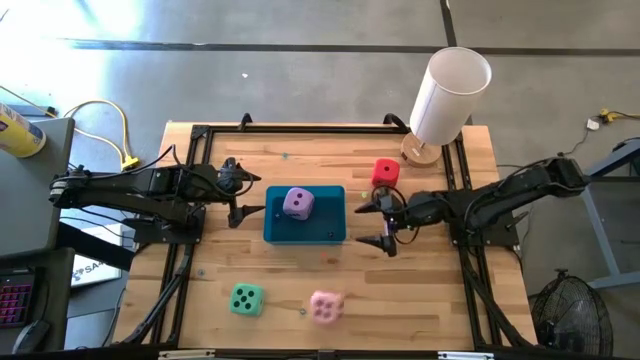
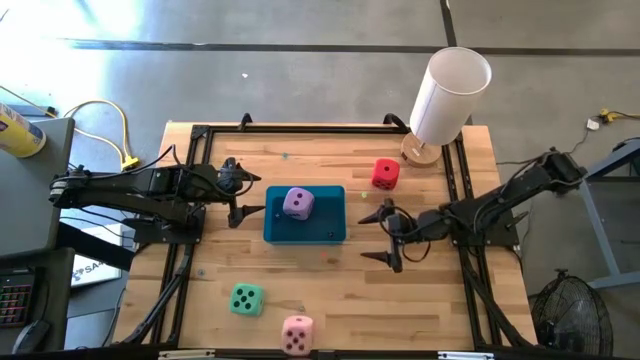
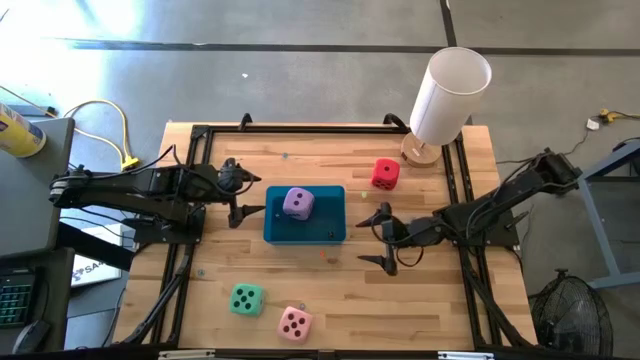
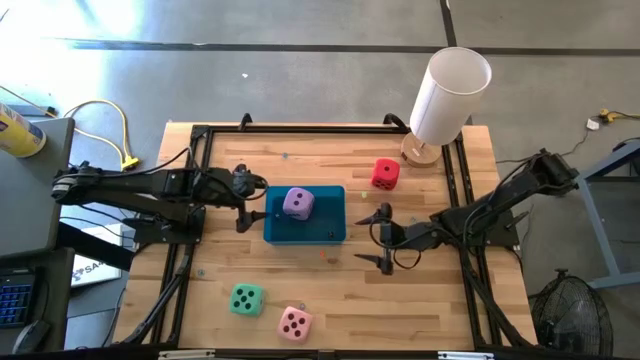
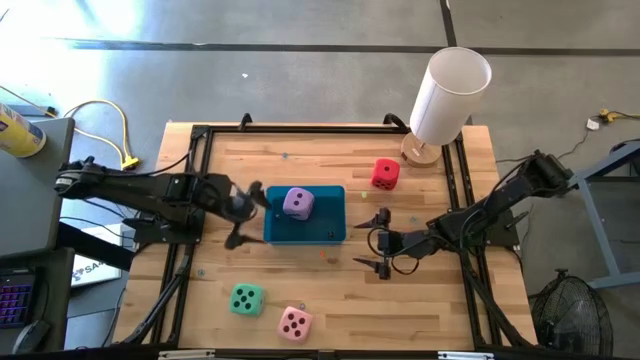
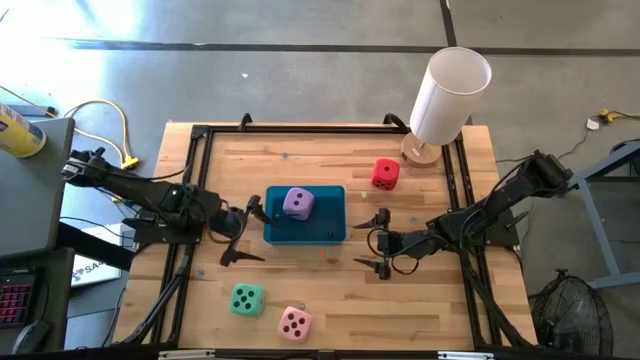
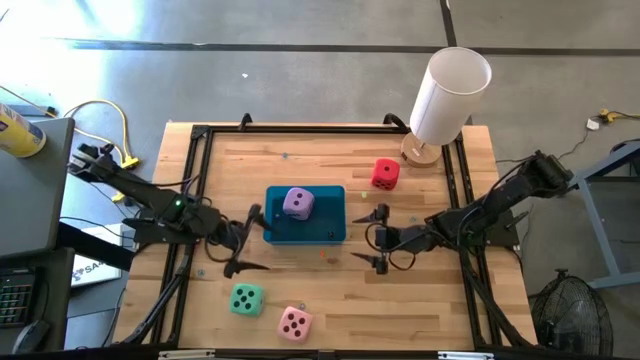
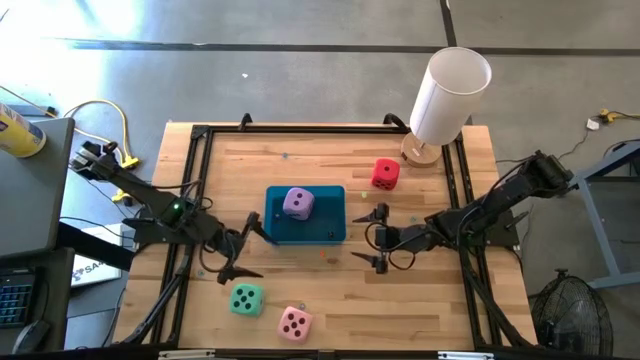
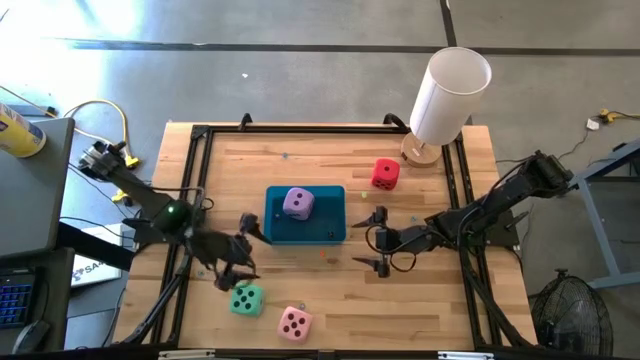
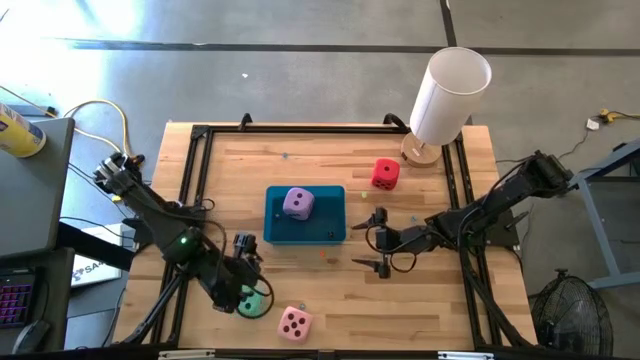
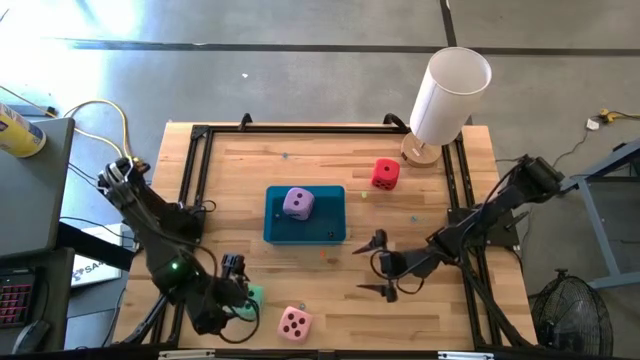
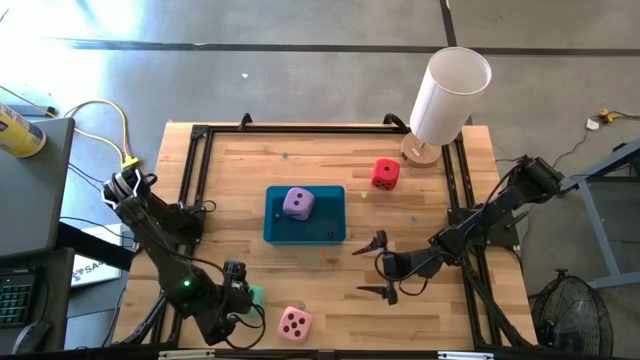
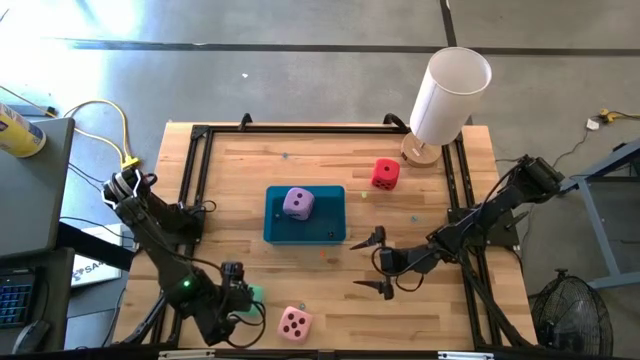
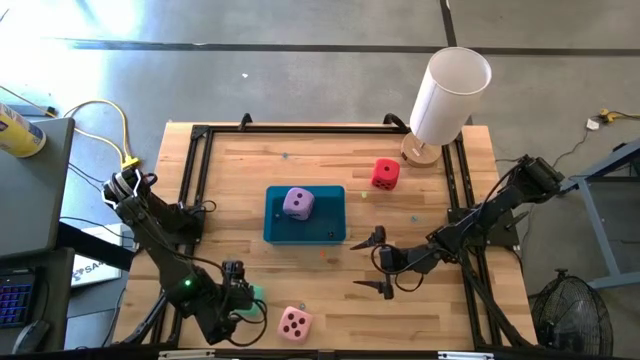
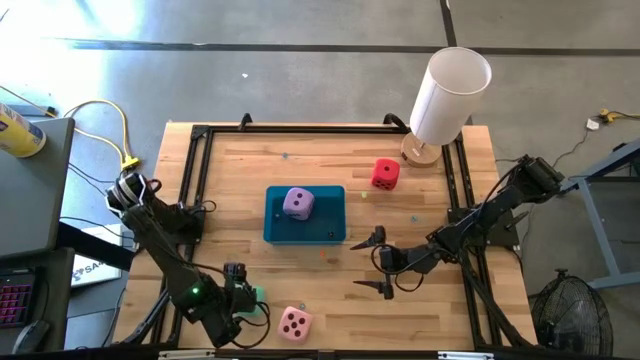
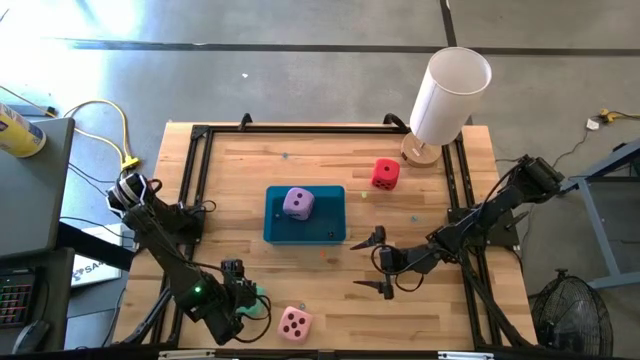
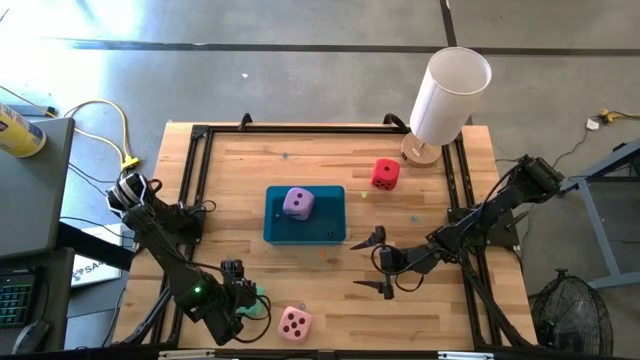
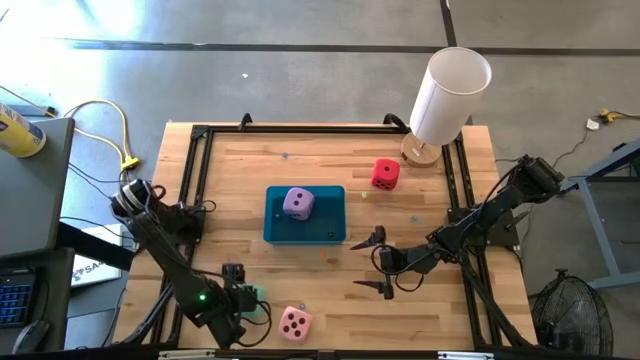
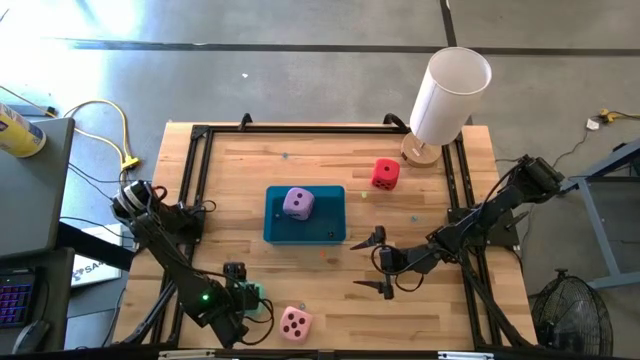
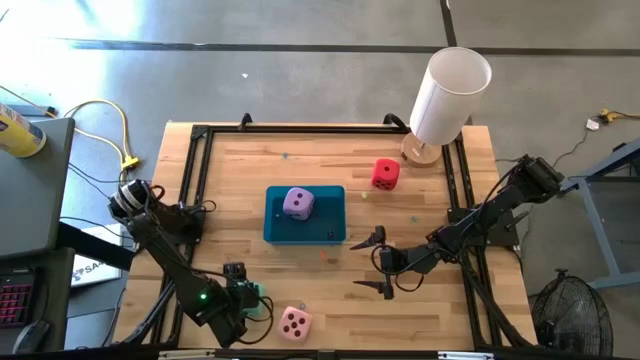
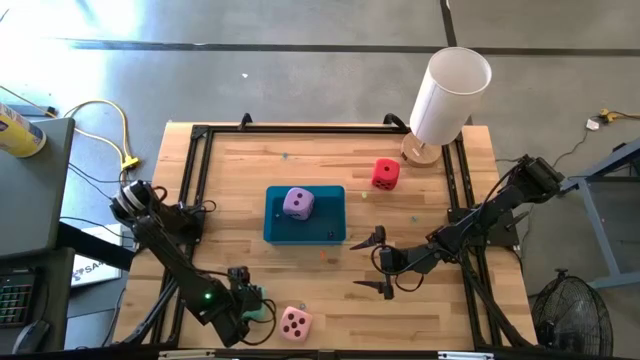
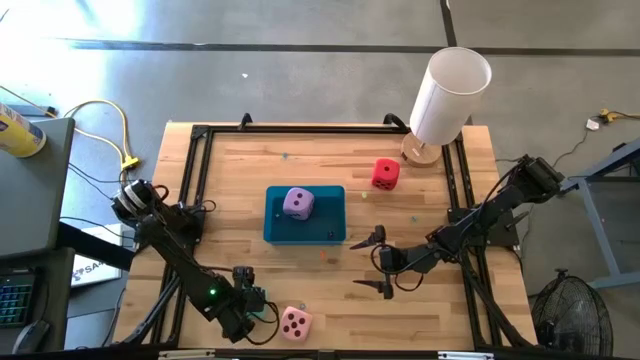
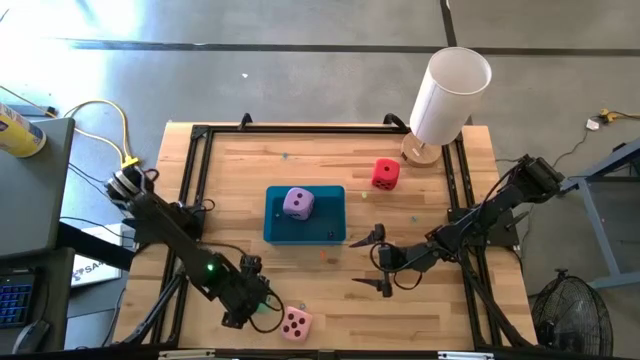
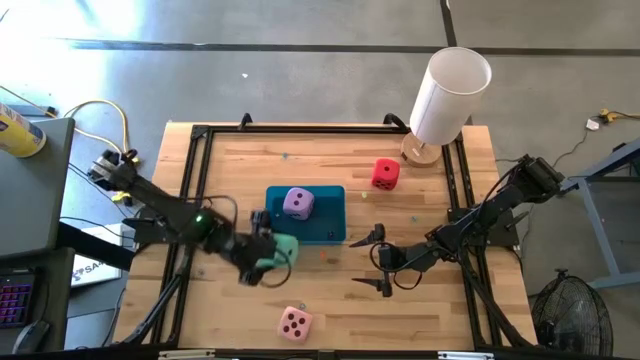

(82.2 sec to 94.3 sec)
Task: Pick & Place Dice
Put the large light green dice into the blue bin

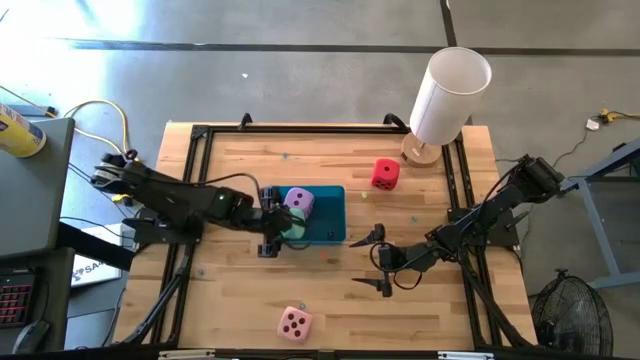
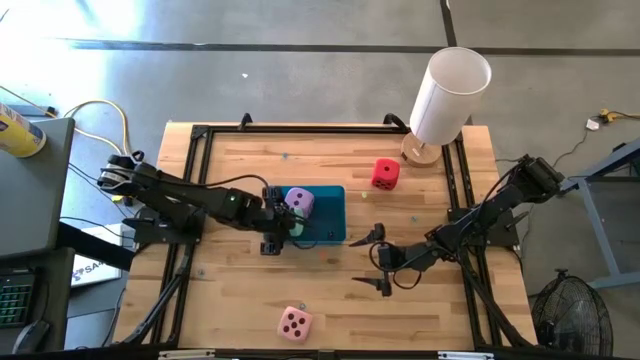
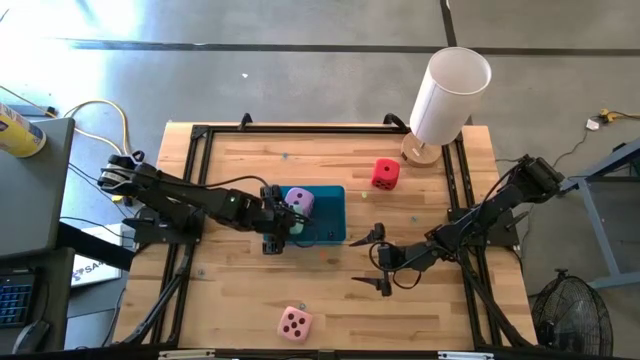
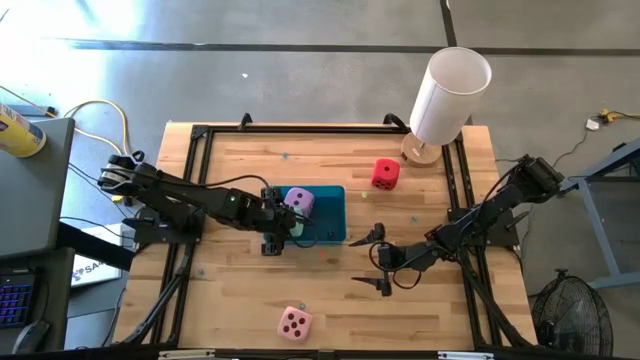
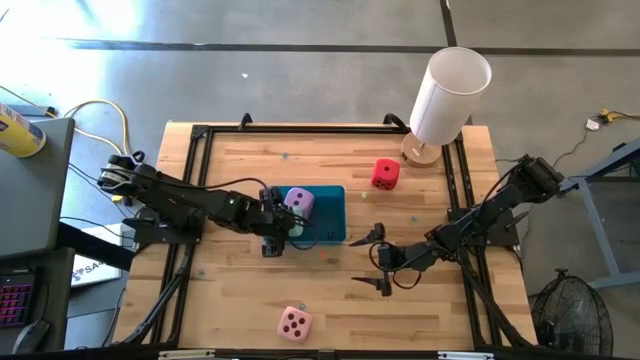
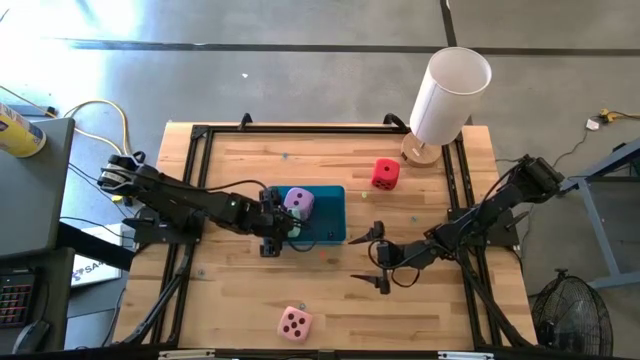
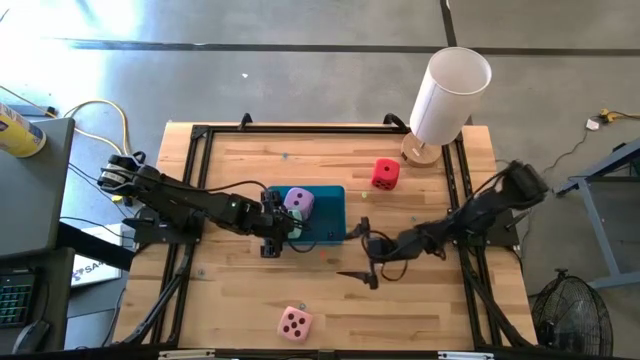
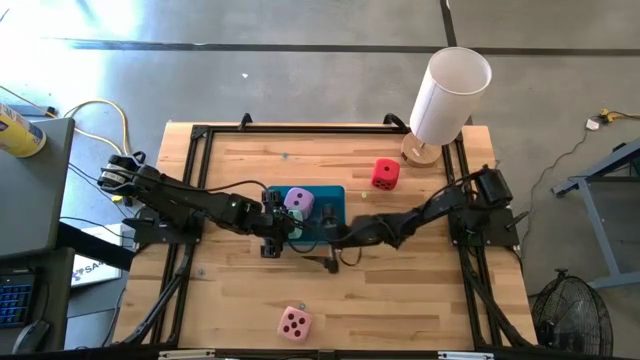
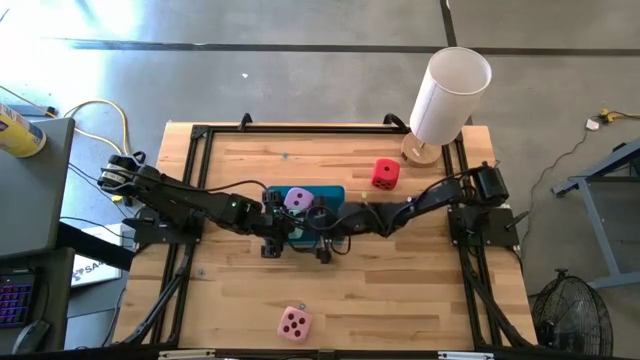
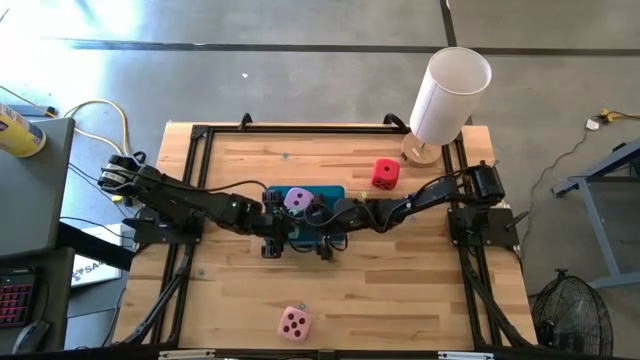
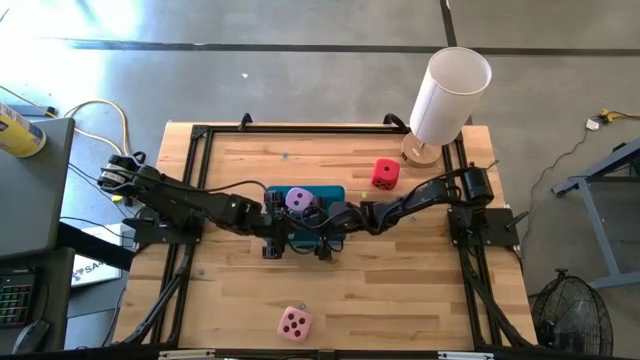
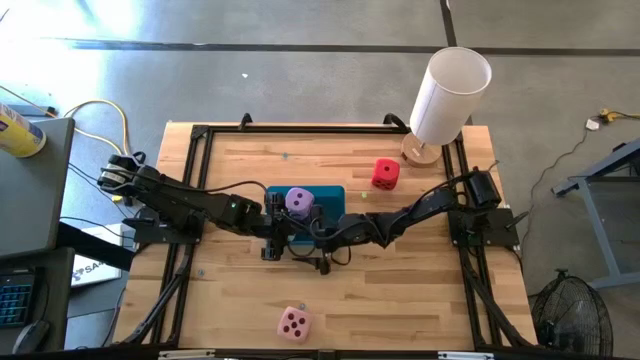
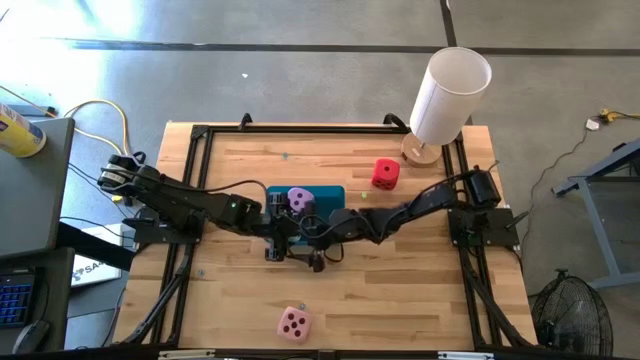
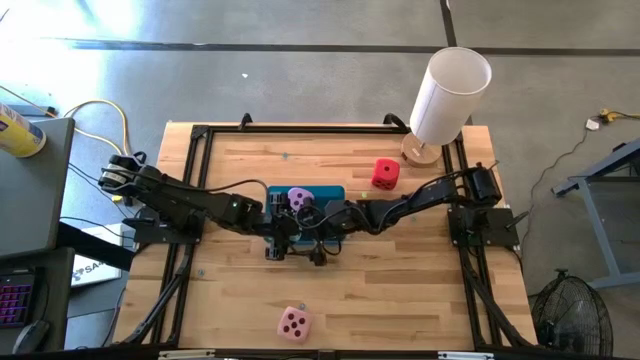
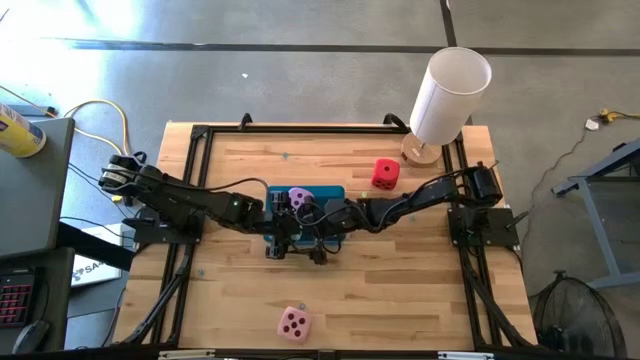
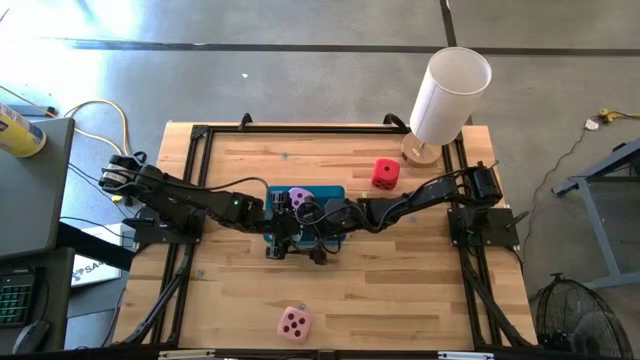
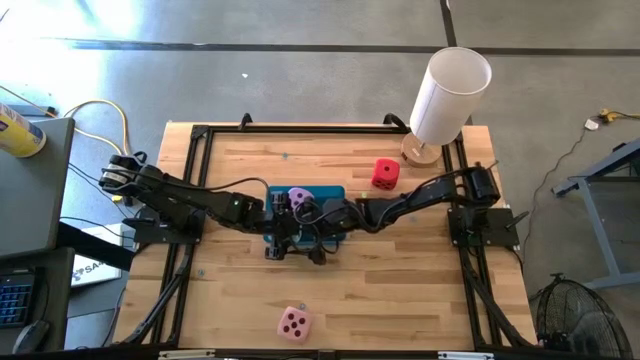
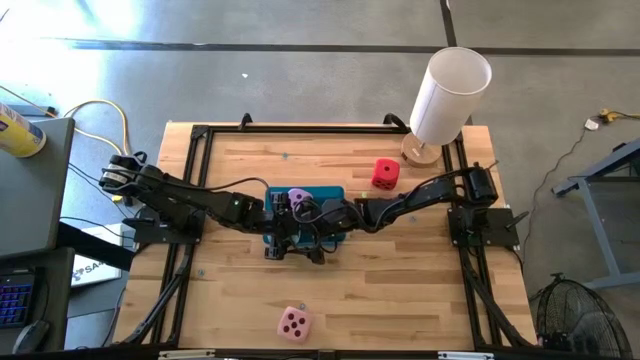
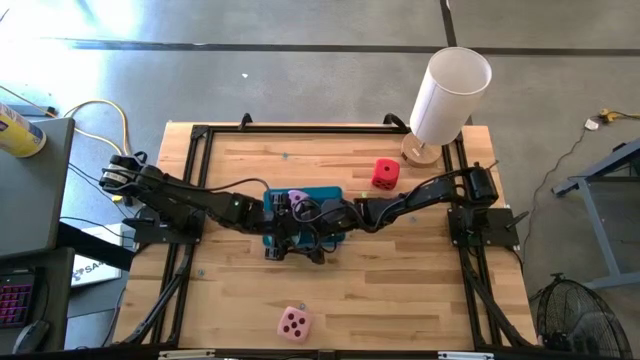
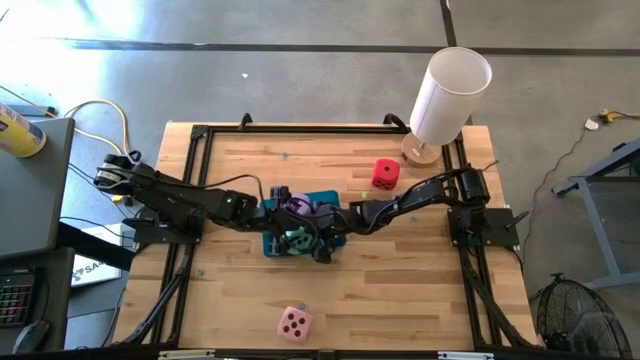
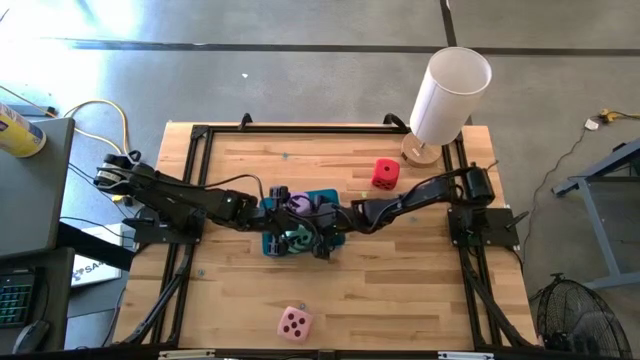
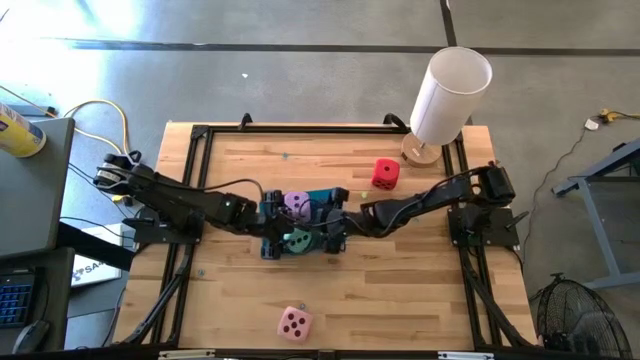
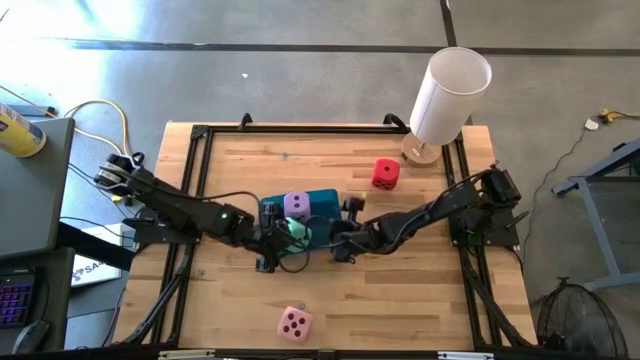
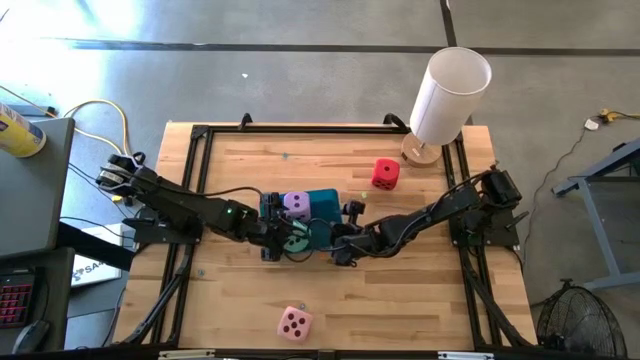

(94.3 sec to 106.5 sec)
Put the large light green dice into the blue bin
